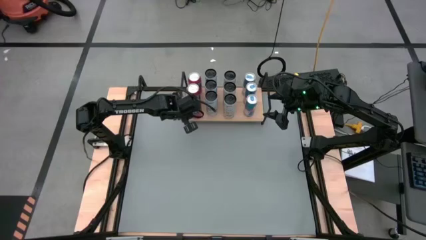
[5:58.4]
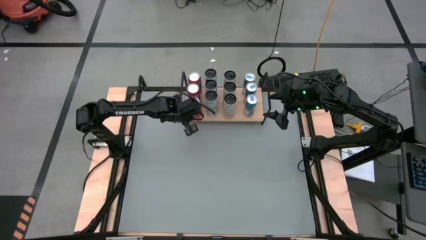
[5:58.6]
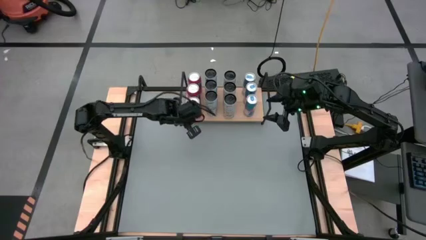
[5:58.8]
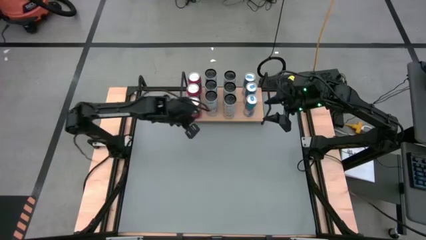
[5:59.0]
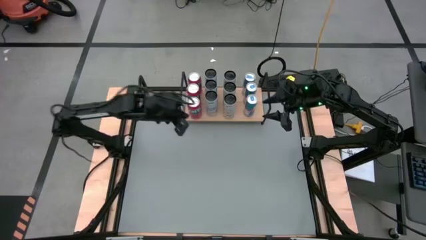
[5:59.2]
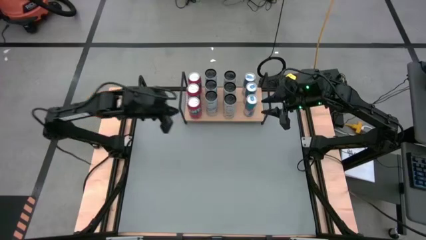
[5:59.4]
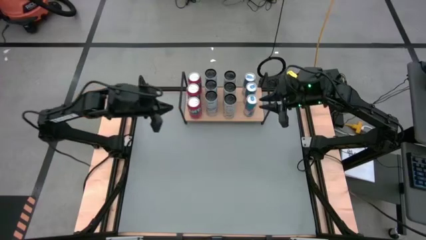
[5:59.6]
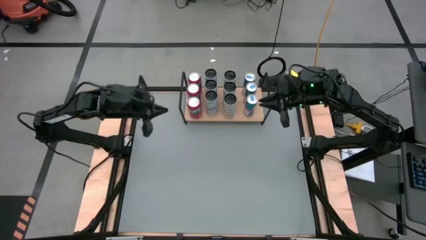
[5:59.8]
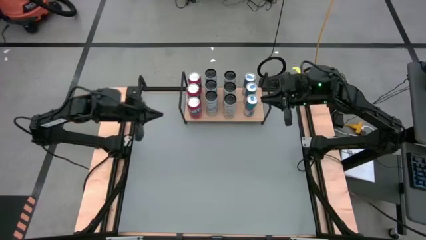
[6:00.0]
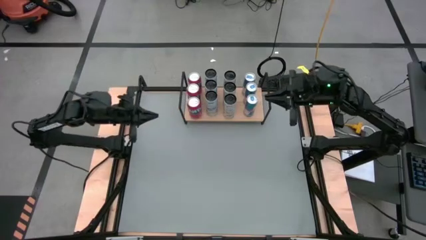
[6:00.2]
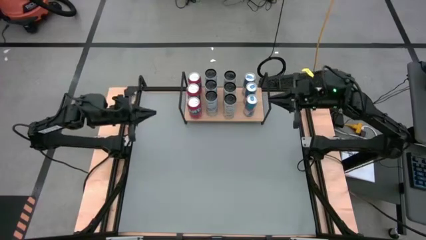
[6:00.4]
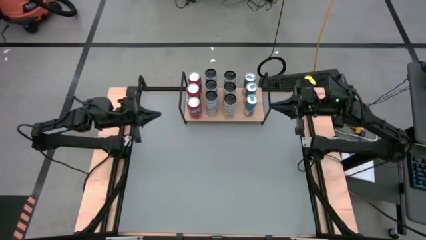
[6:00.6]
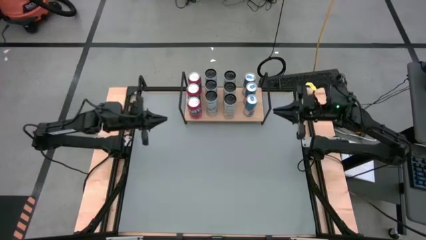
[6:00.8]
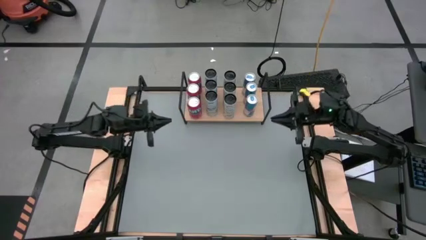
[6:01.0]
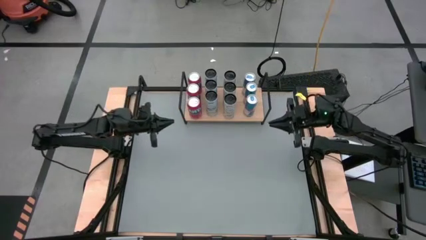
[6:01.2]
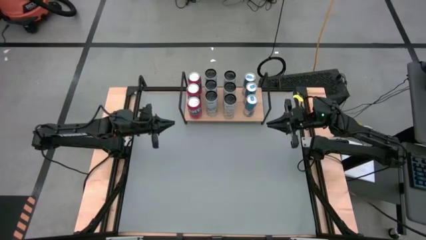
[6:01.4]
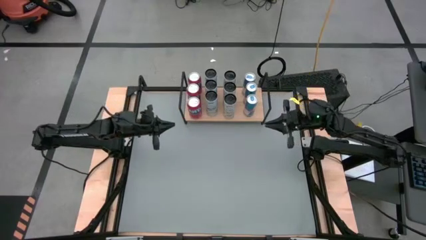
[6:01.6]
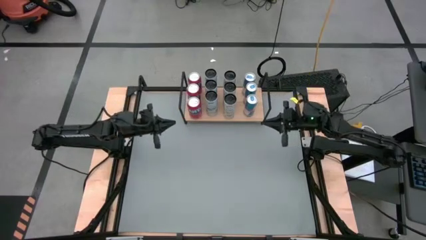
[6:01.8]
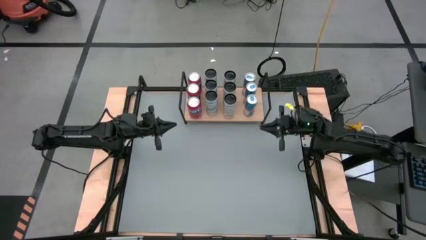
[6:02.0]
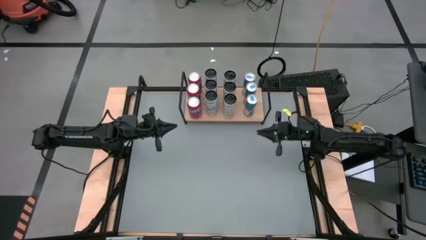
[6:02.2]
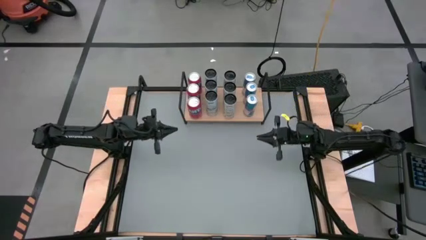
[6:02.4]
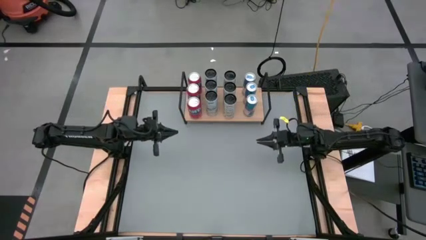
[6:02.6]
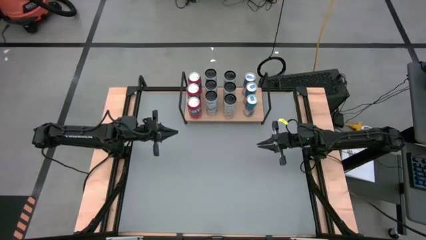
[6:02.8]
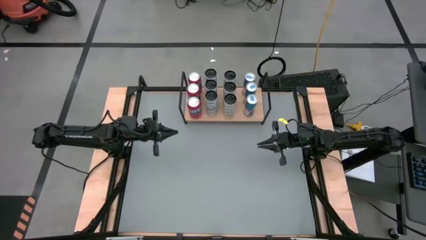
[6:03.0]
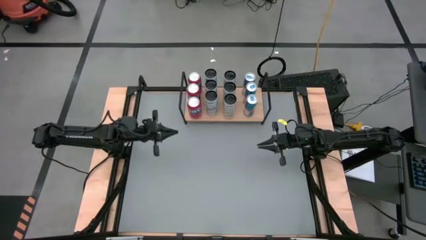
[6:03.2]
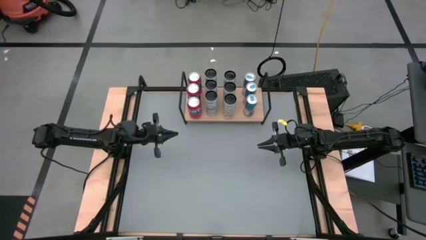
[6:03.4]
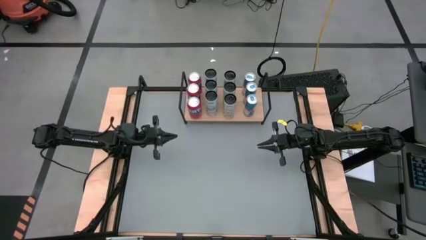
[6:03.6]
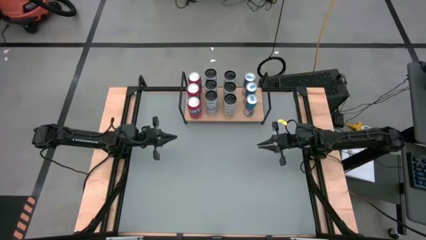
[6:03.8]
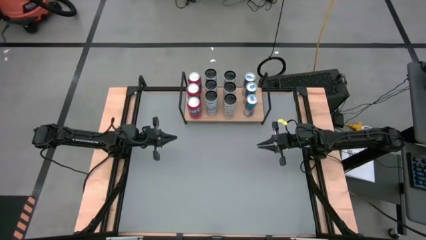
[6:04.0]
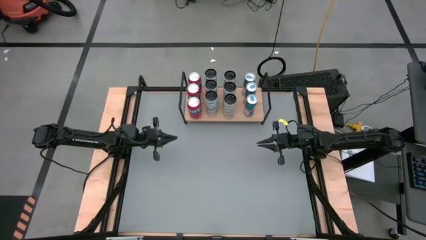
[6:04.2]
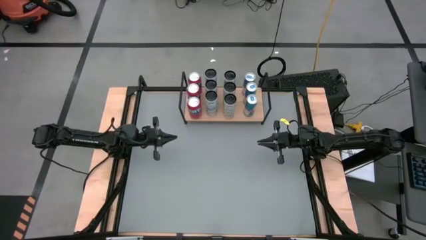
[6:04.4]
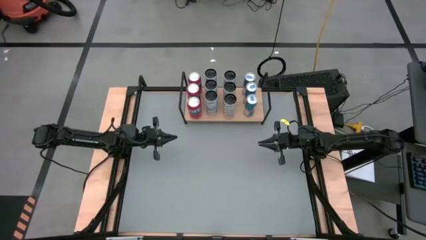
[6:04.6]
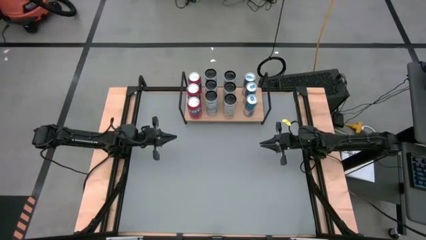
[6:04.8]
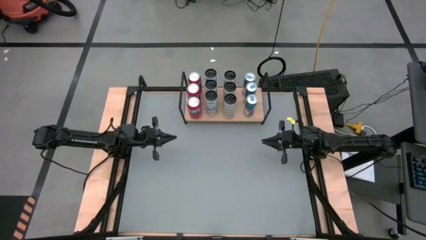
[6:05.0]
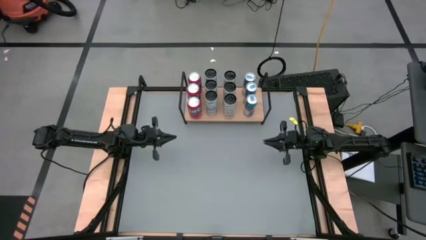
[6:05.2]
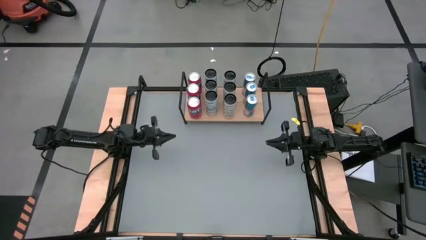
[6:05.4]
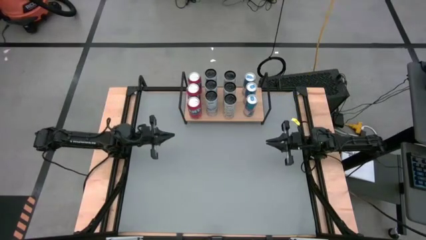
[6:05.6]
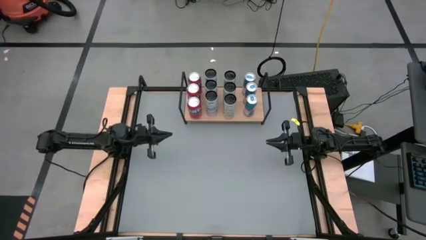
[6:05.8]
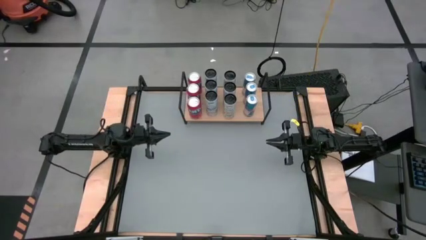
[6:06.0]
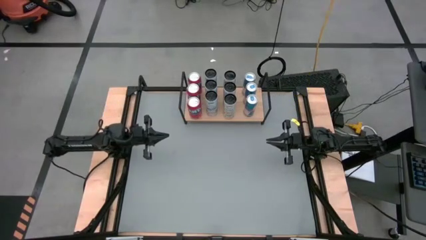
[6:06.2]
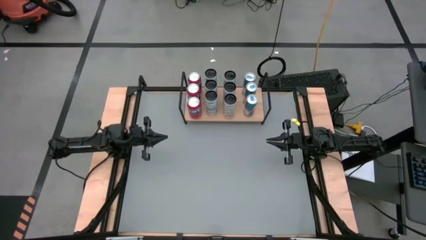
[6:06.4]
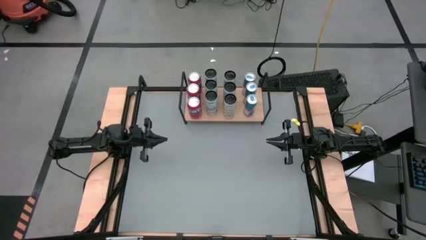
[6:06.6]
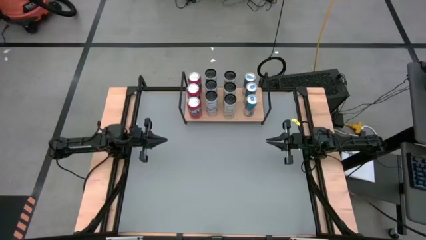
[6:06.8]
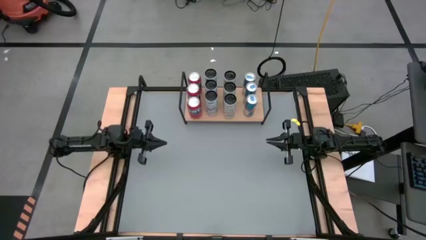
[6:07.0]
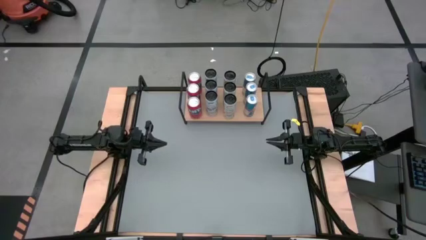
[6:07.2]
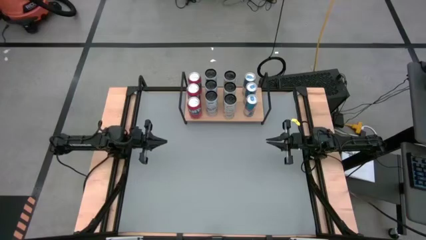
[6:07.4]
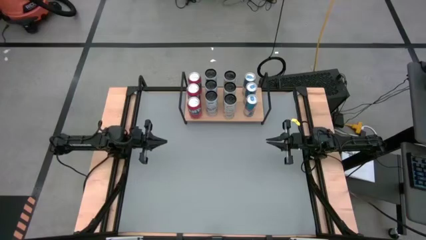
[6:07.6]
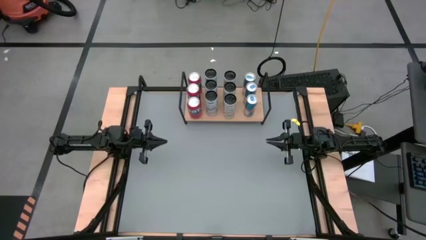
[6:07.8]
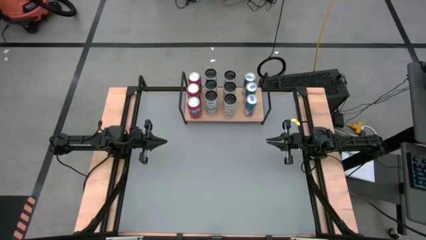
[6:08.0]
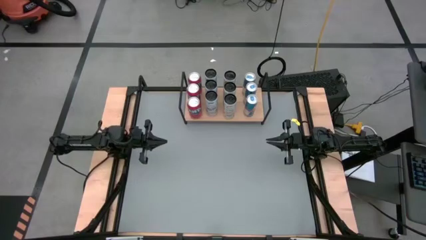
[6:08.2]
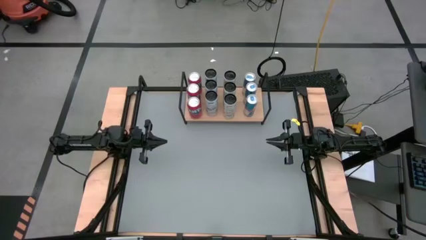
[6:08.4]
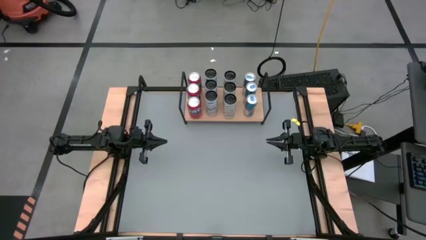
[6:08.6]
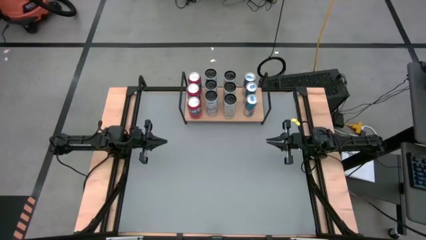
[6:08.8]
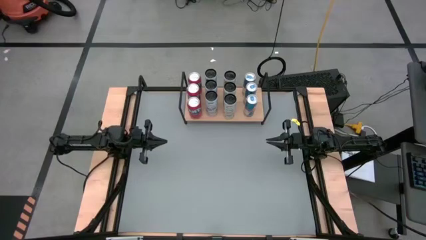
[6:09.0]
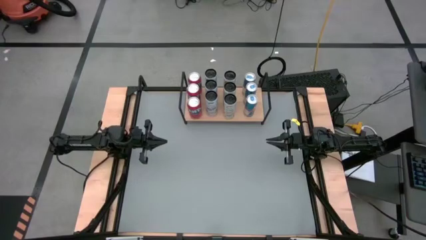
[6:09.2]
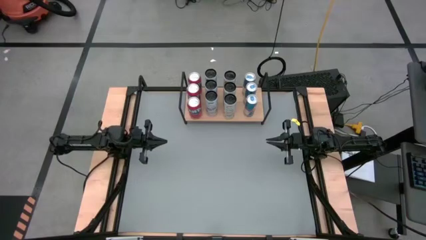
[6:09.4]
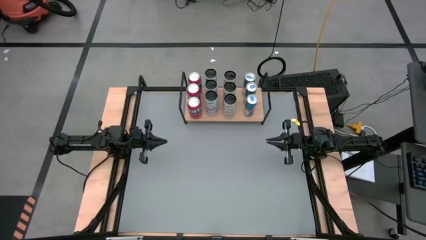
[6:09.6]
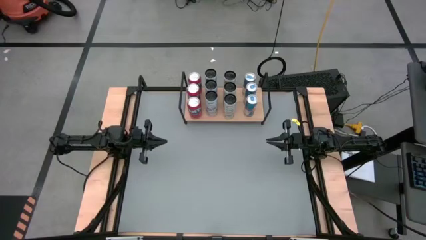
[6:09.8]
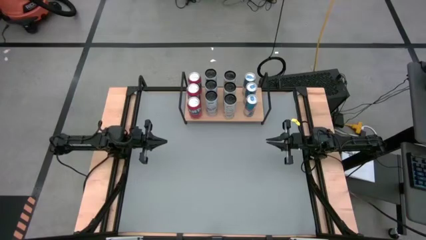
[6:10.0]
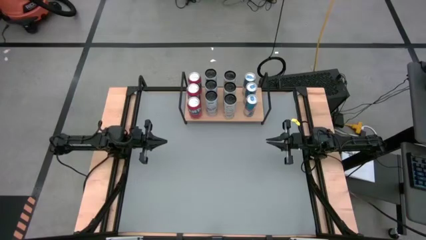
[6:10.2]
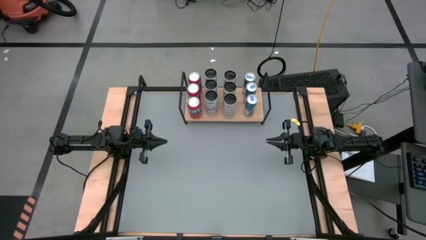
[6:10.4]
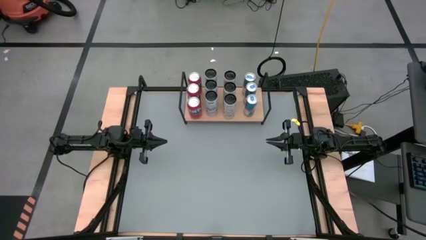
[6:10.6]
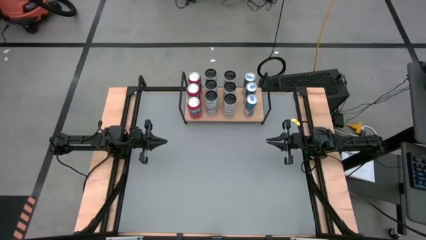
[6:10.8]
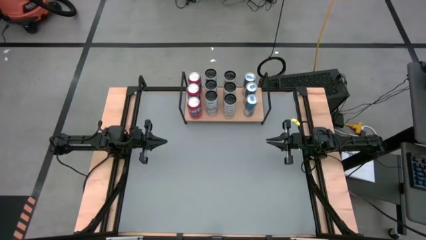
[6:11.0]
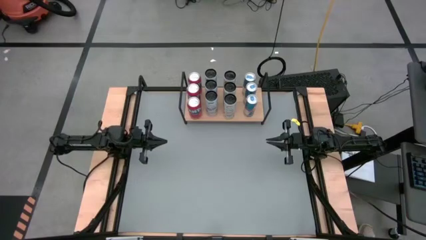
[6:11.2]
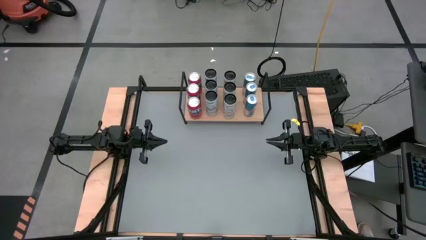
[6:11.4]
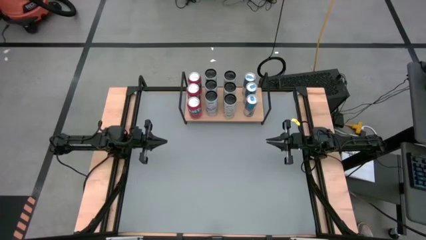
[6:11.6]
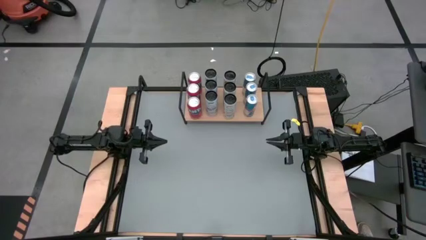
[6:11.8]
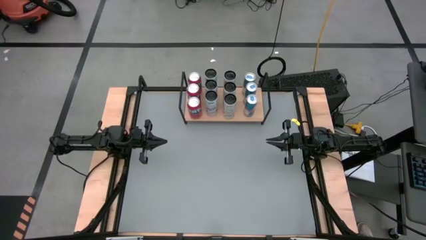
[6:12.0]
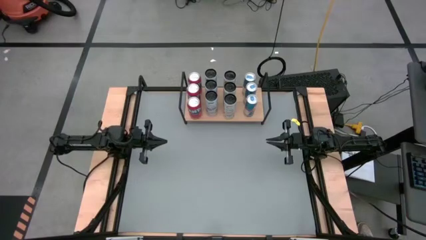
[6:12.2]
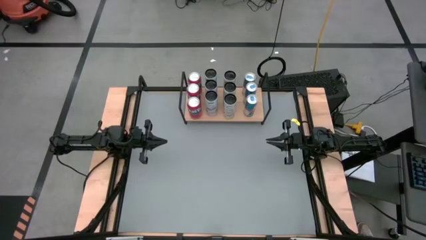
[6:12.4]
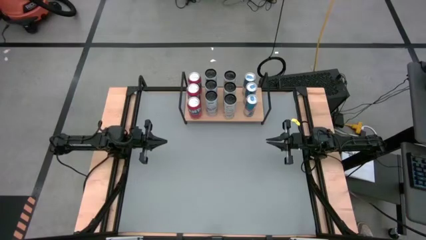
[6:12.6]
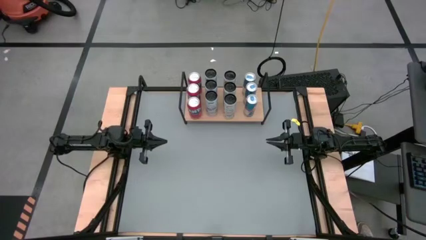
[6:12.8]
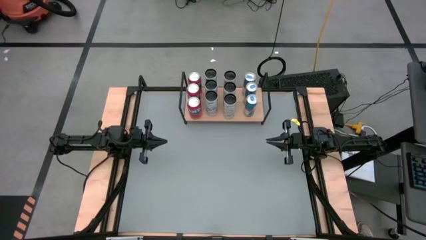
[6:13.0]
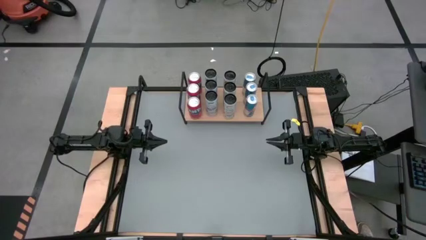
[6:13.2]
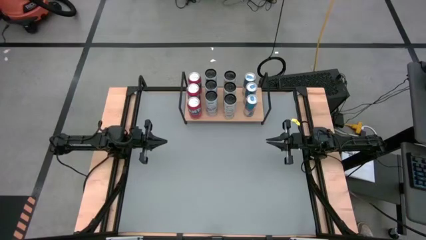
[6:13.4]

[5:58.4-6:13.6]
Task: Place canned beverage on shelf
Return to Home Position
